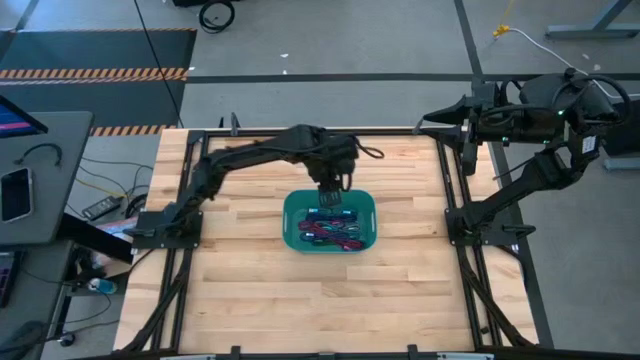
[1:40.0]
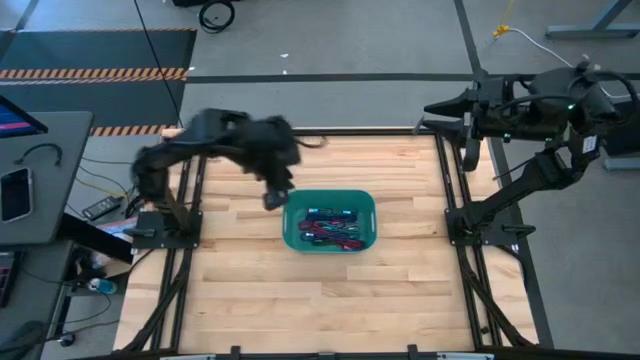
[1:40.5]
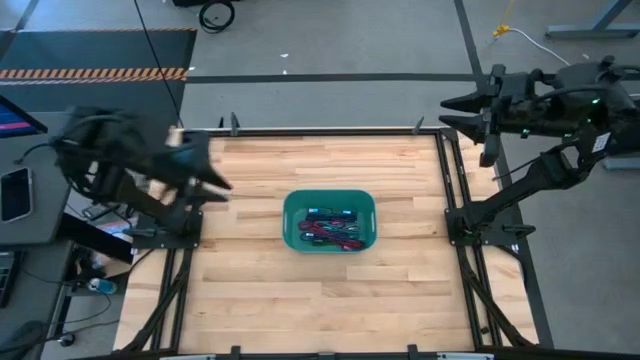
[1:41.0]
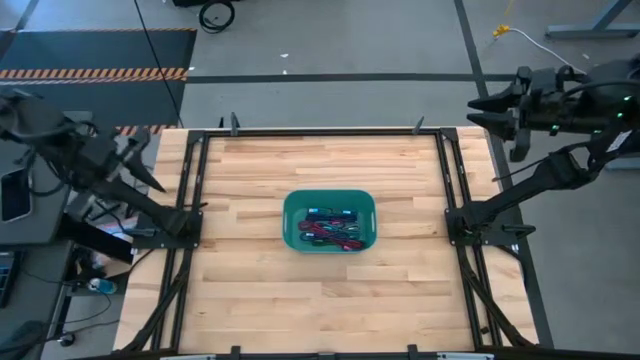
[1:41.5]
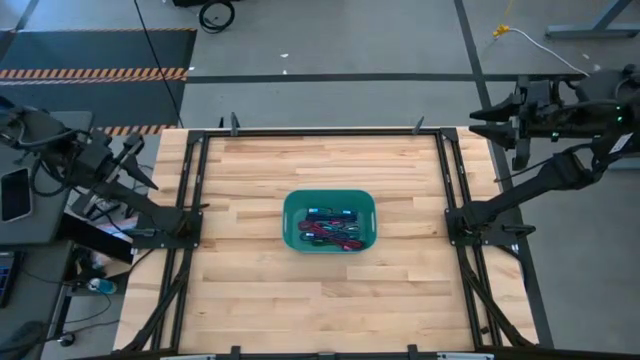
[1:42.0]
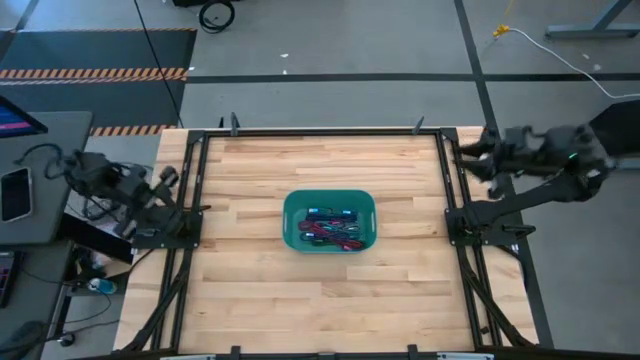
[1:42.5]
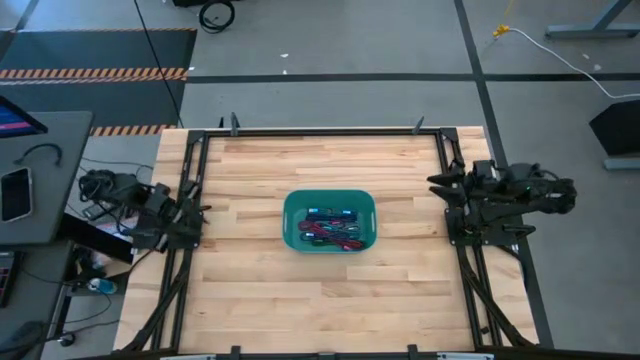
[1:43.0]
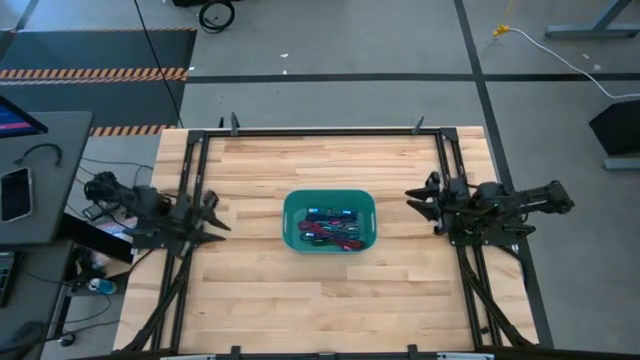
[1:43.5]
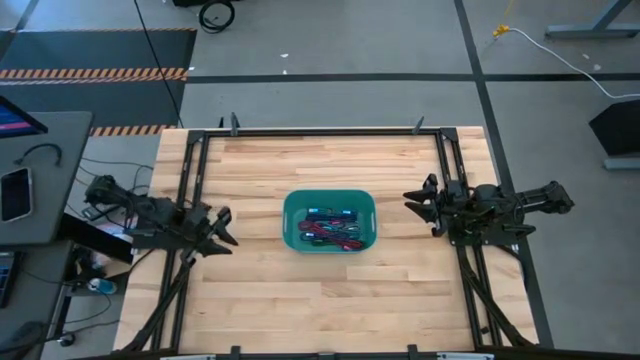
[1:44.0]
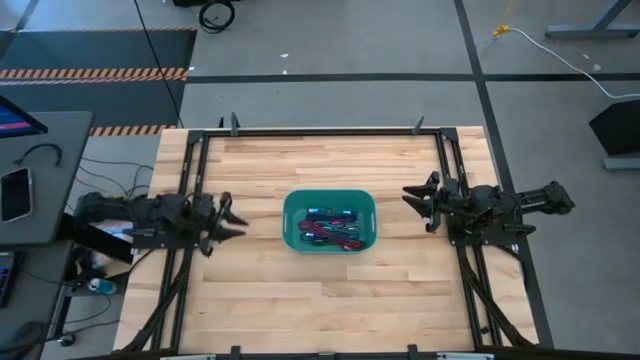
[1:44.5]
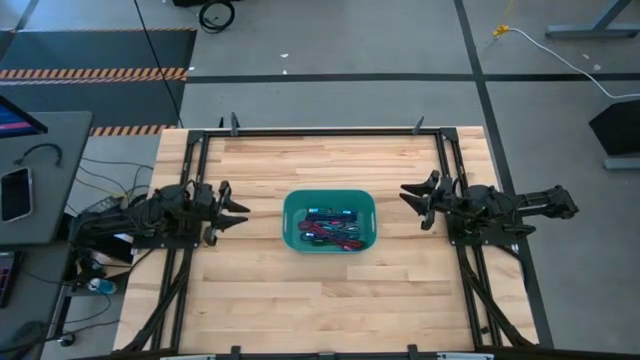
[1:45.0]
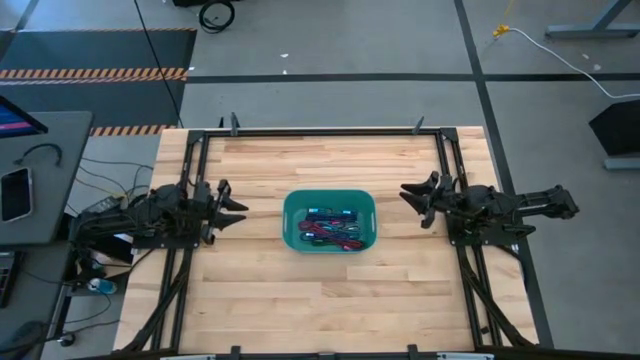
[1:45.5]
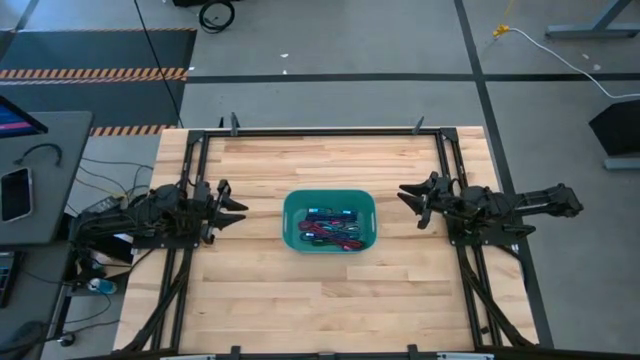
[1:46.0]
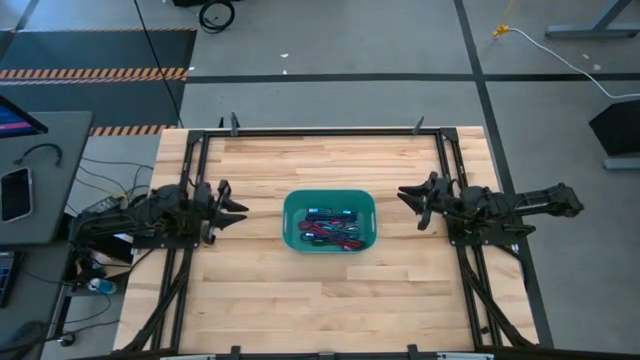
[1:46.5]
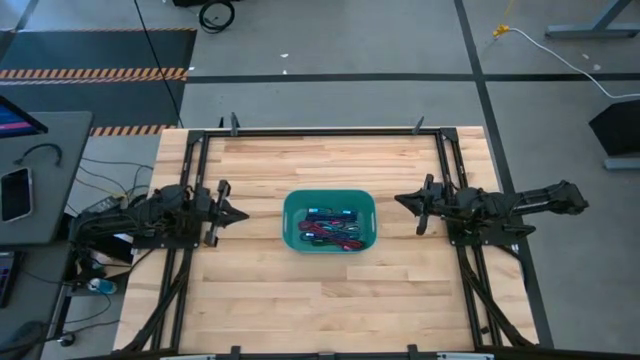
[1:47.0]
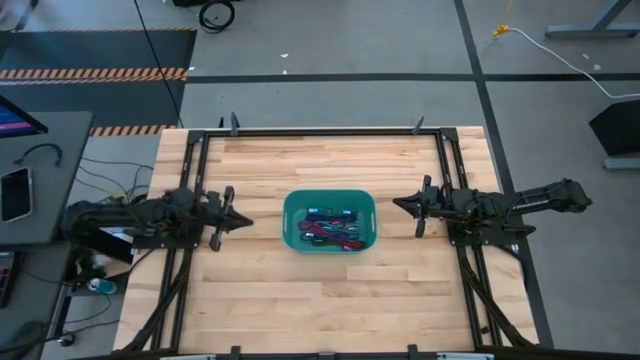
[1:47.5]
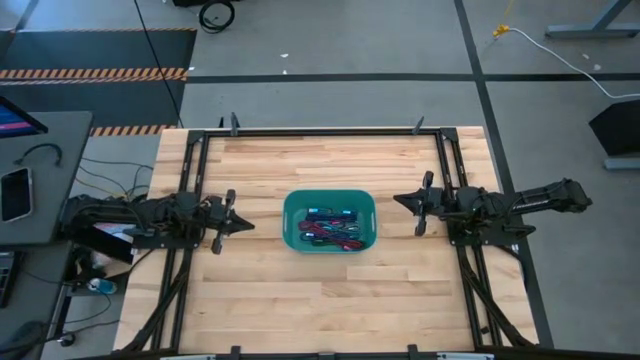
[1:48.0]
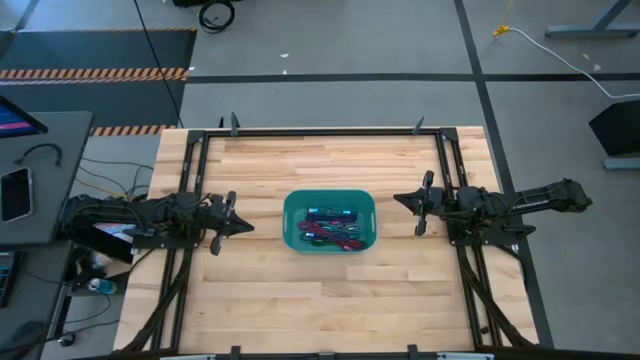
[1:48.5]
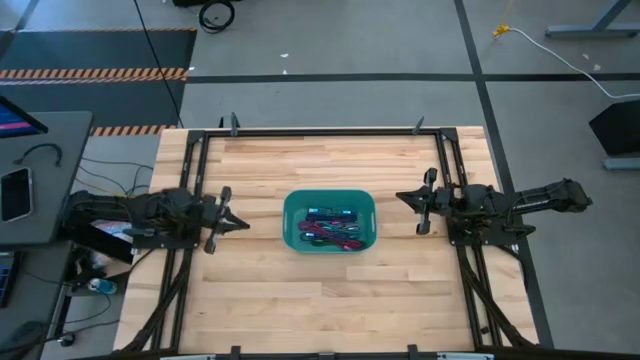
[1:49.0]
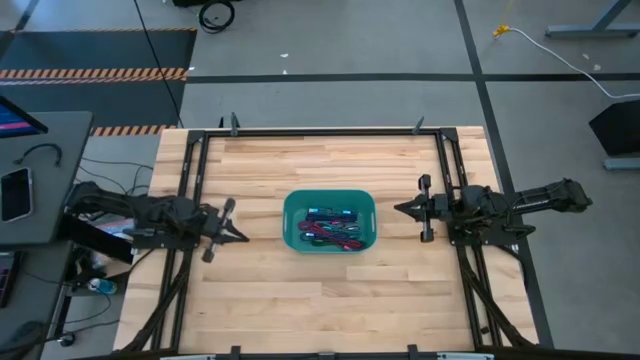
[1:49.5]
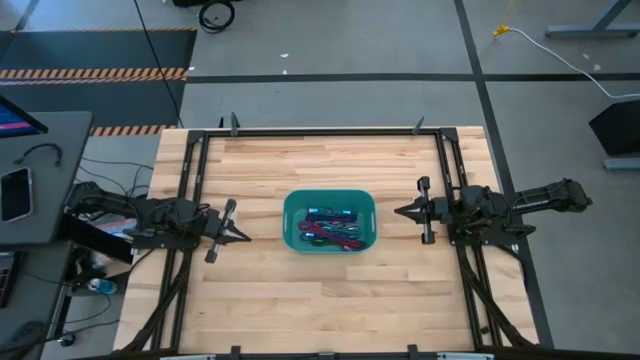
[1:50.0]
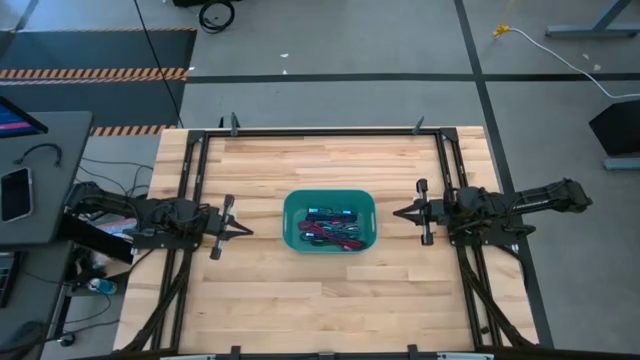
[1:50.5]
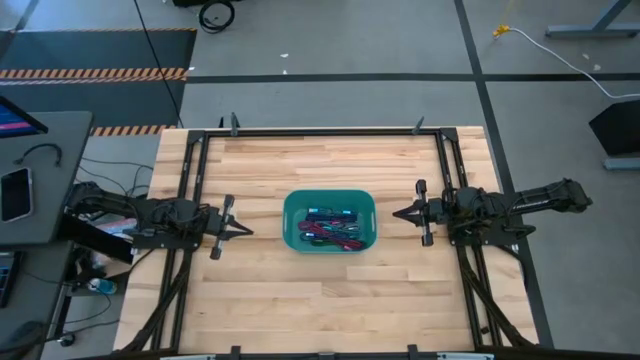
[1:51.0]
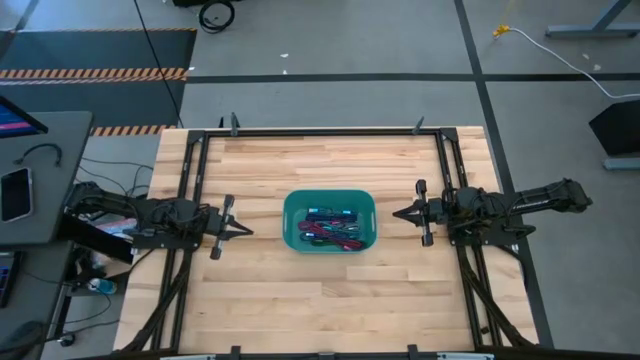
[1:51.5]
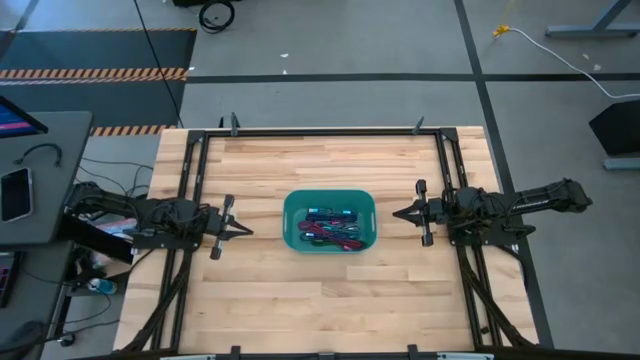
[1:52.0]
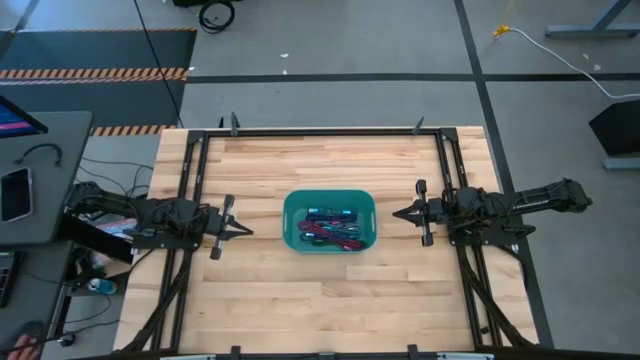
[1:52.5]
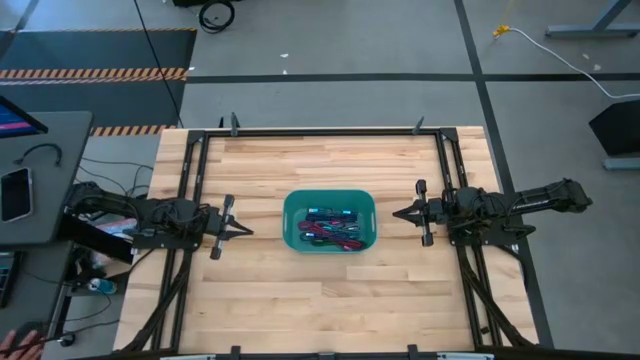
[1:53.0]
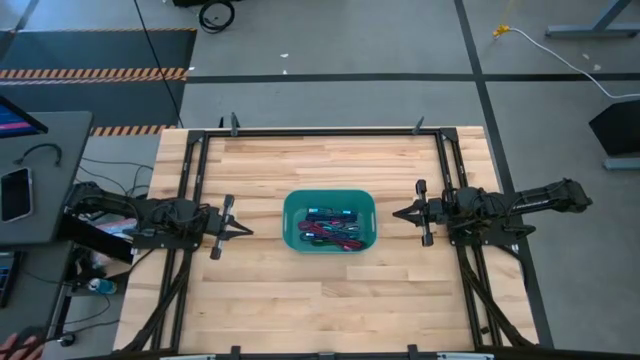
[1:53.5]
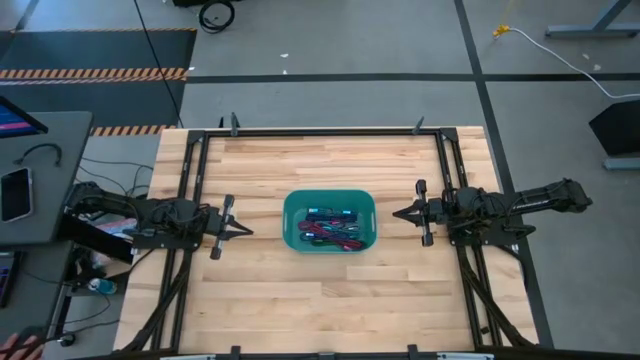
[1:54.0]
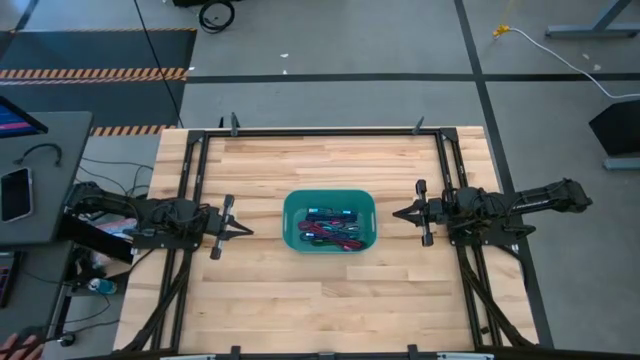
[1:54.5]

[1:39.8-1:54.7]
Task: Pick and place USB-C Cables
Return to Home Position

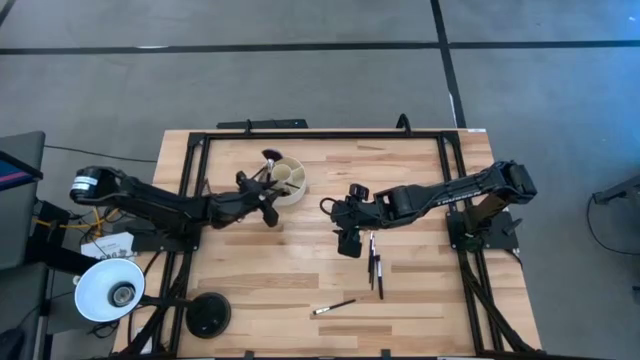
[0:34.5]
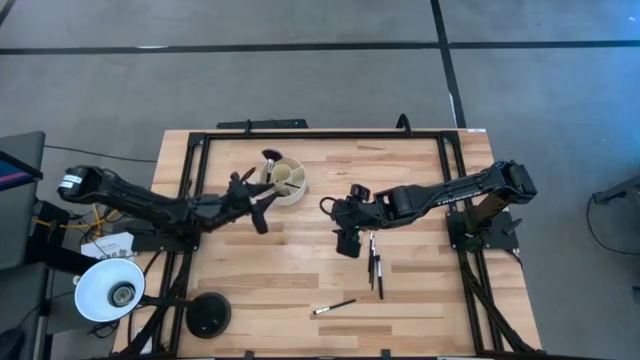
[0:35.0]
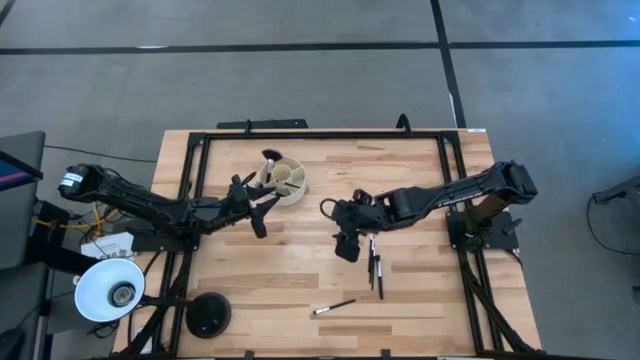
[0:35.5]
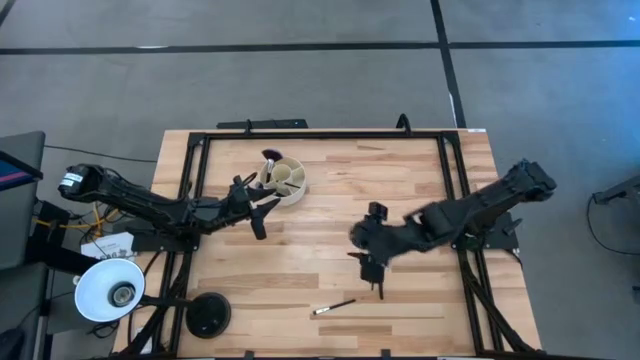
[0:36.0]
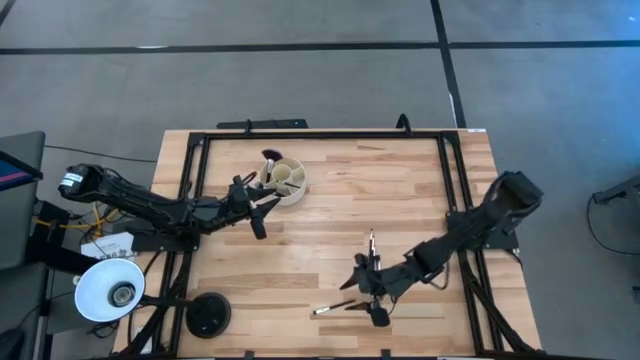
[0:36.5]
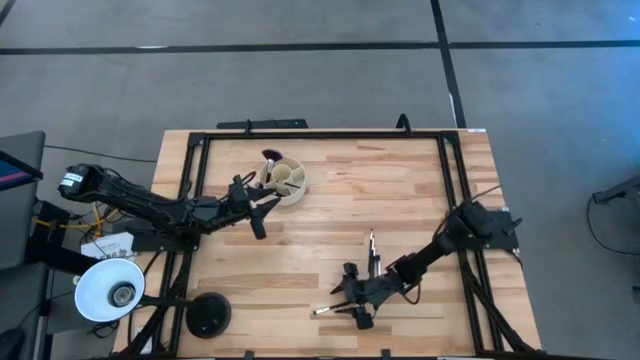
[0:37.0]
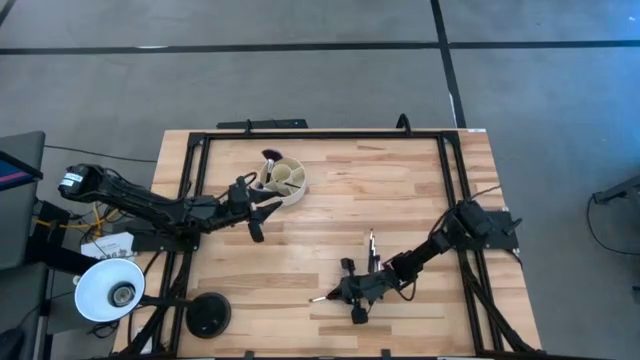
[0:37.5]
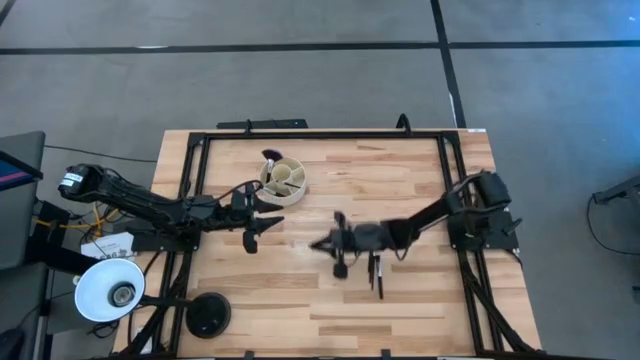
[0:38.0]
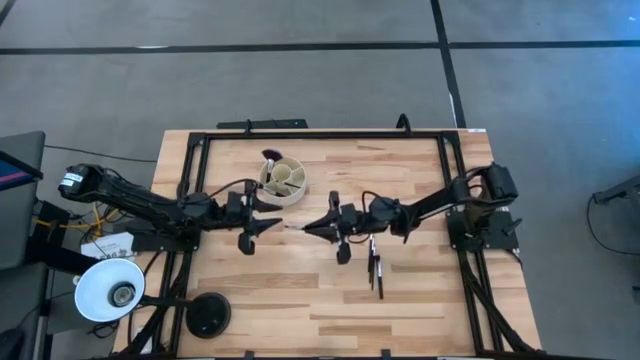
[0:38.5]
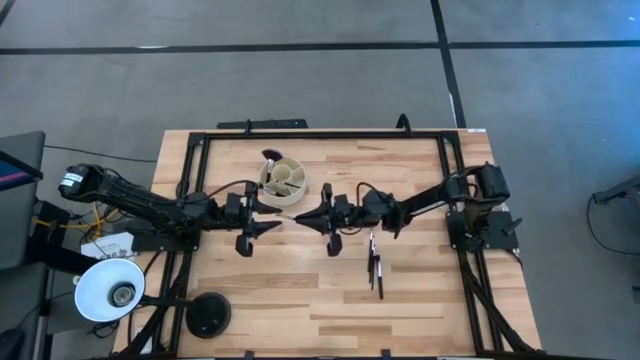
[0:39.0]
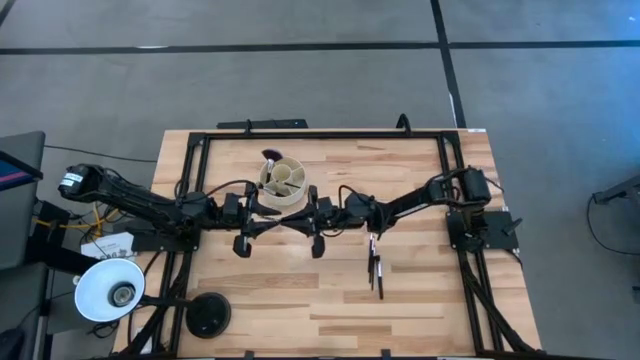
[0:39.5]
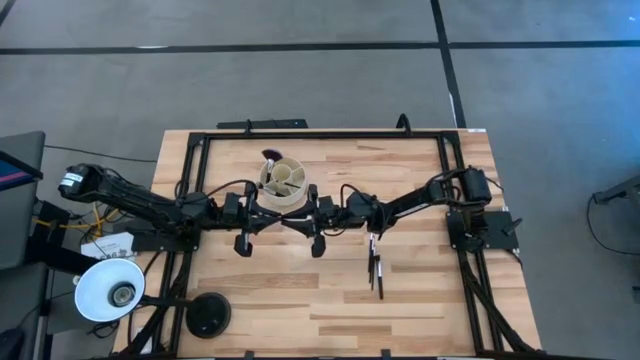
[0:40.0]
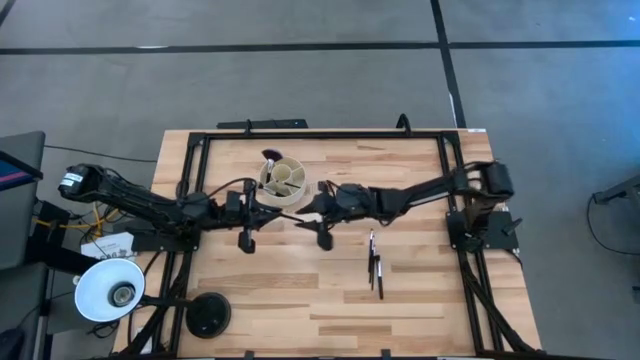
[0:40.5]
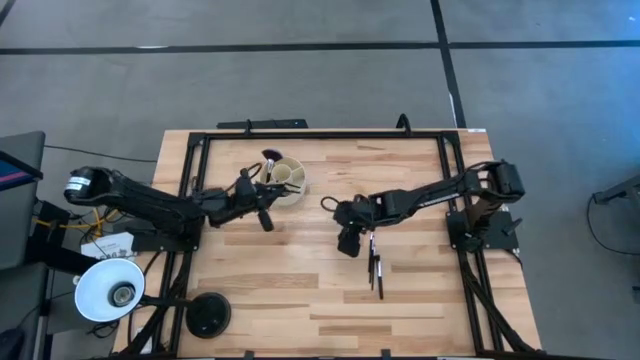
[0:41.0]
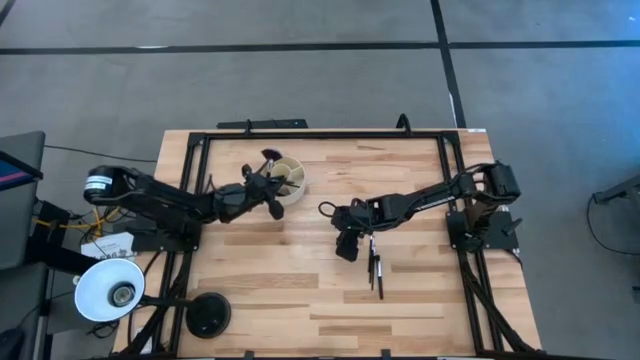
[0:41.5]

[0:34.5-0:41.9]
Task: Sort items
Put the black eyeshadow brush in the white organizer
